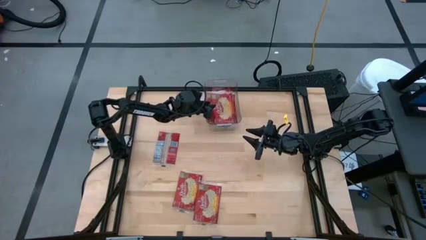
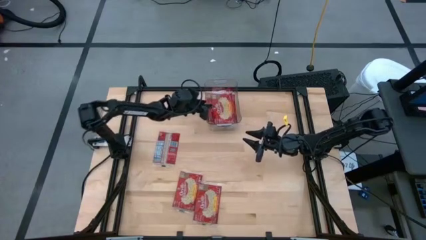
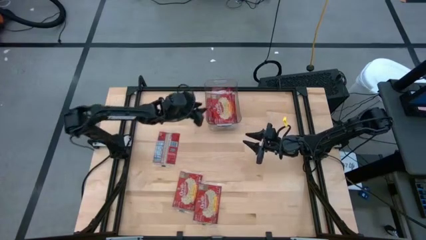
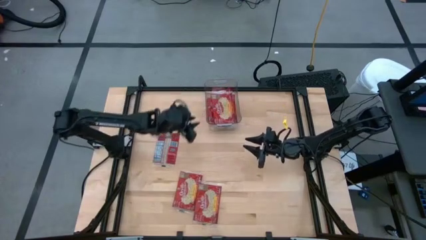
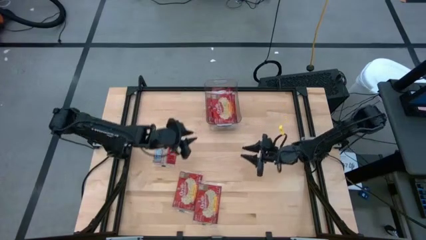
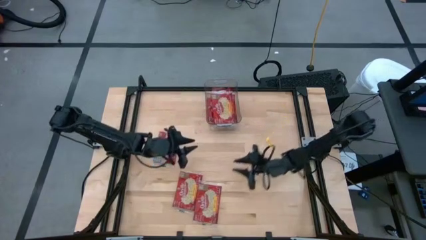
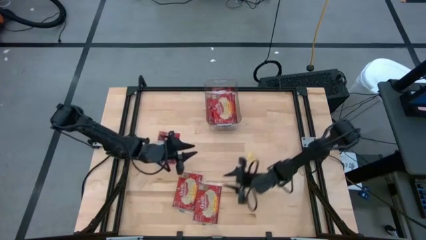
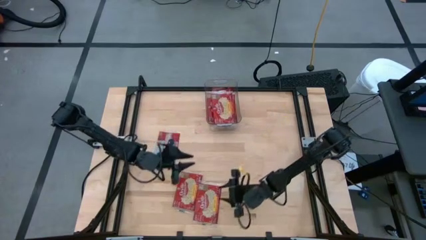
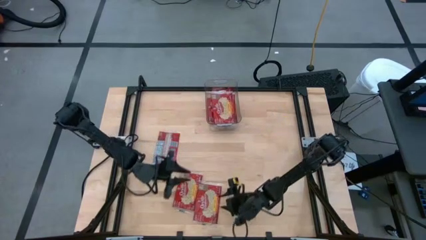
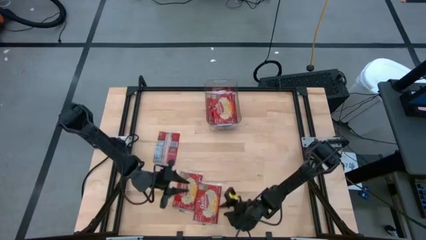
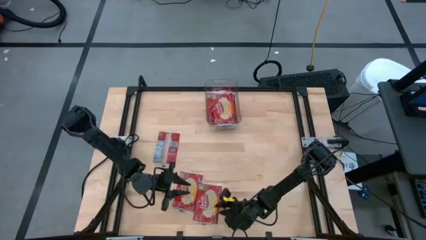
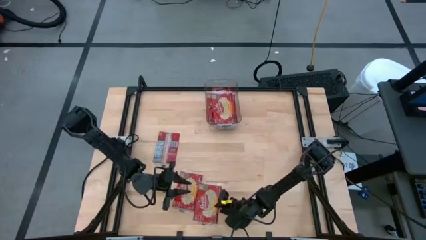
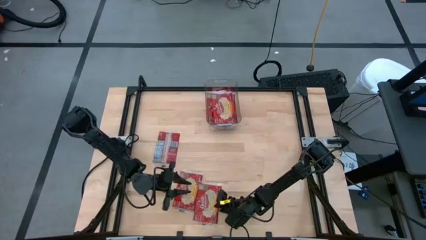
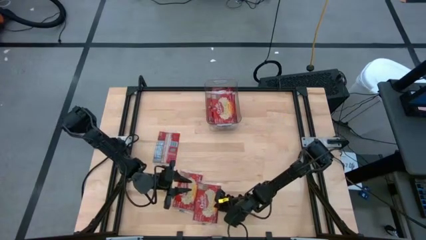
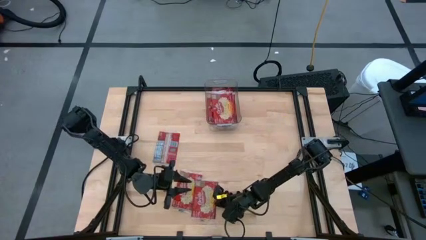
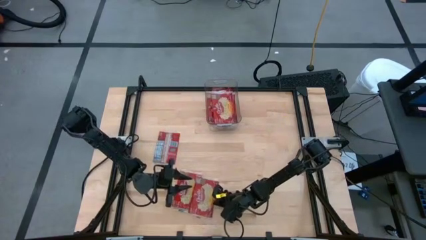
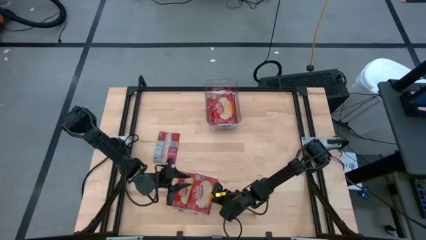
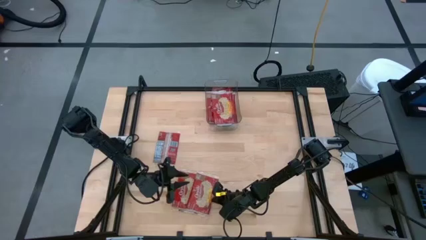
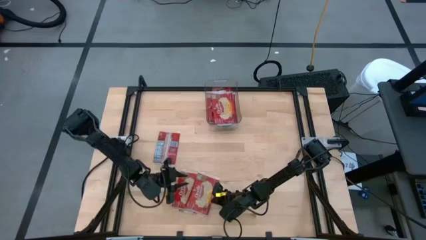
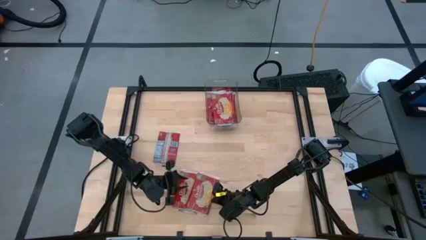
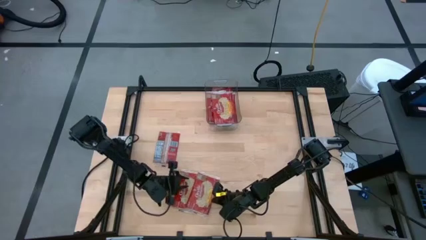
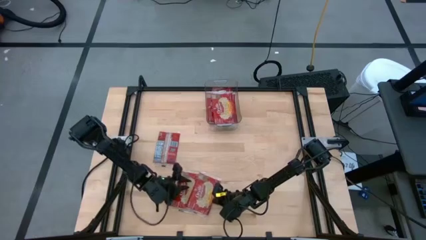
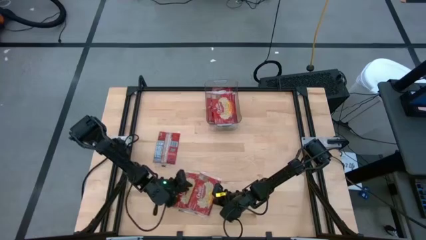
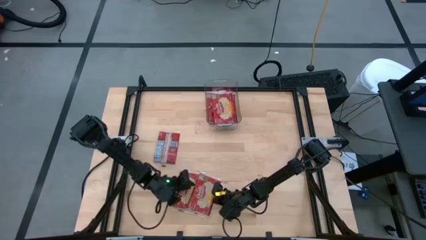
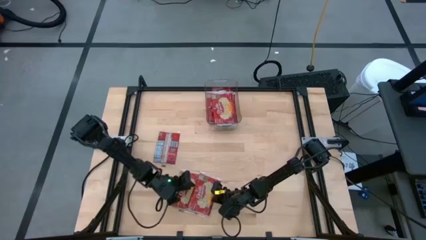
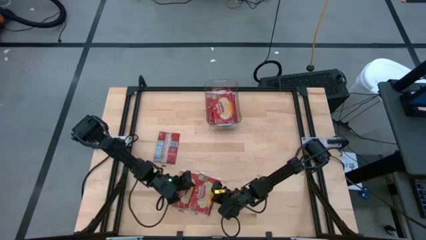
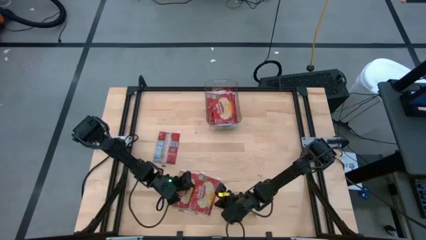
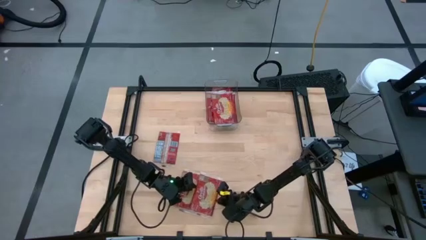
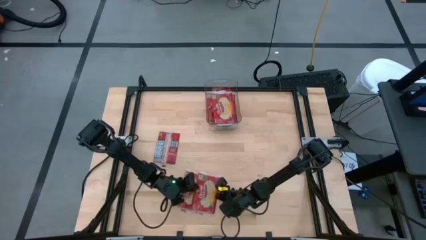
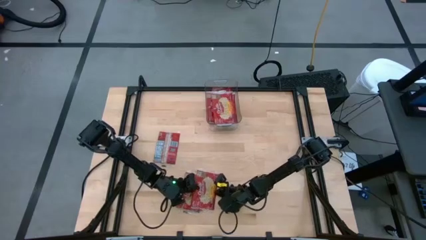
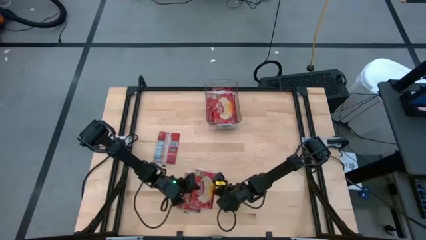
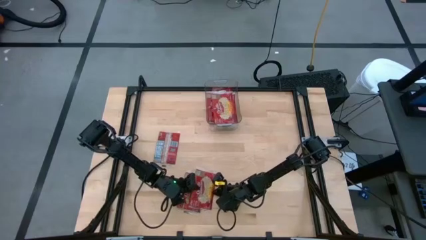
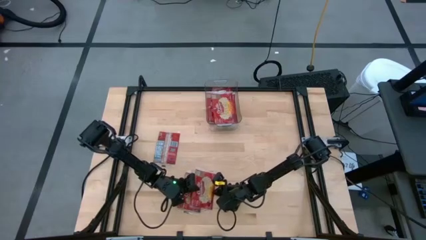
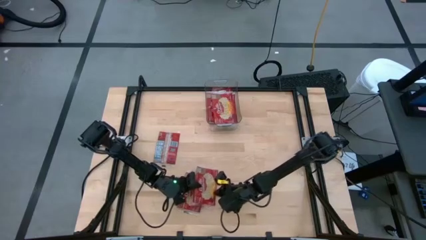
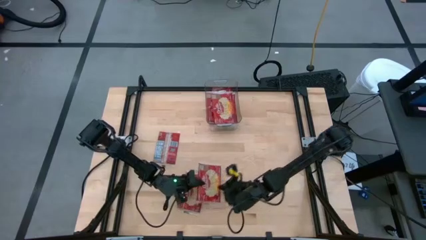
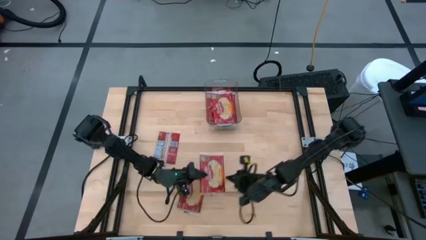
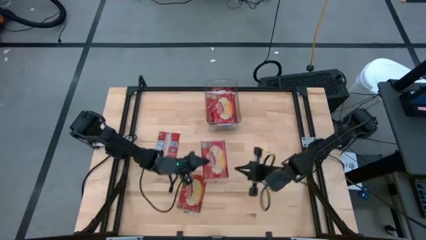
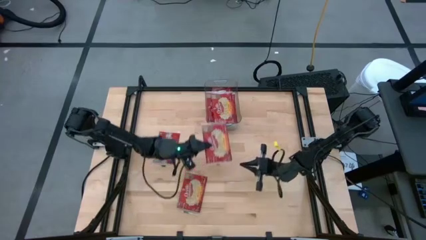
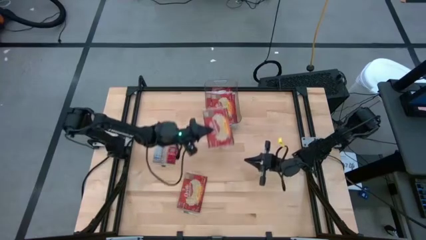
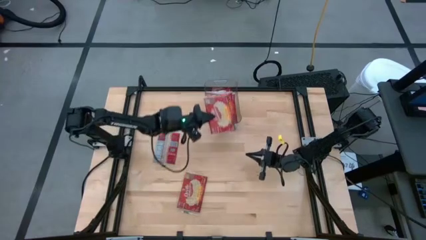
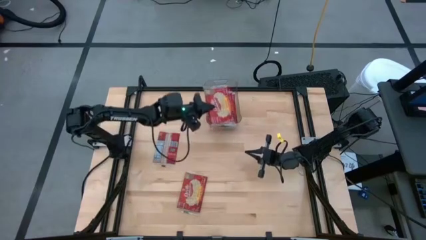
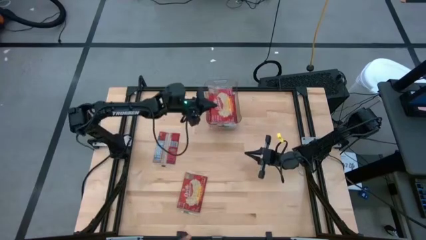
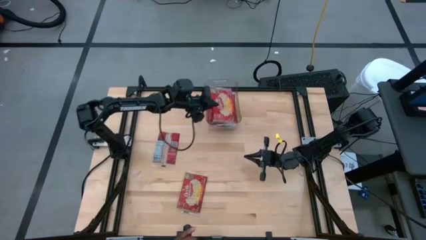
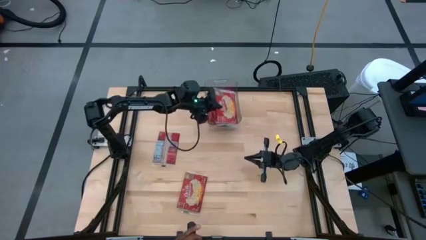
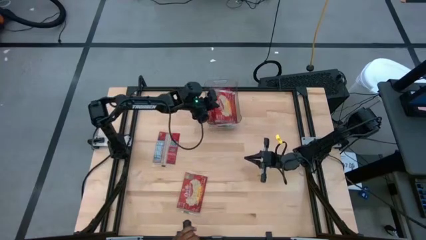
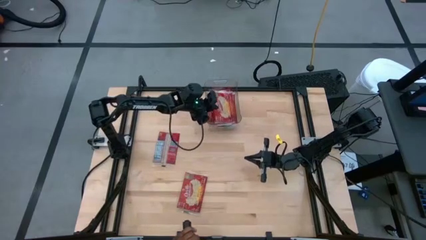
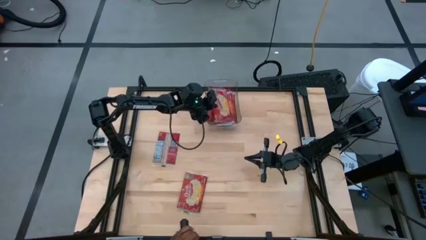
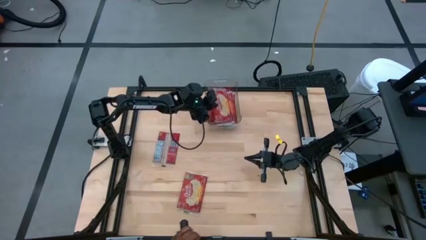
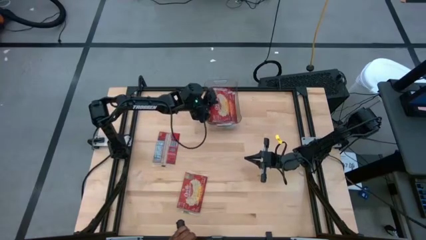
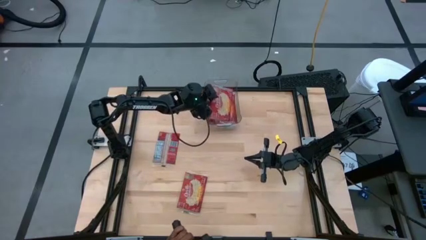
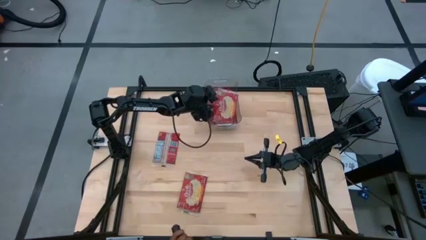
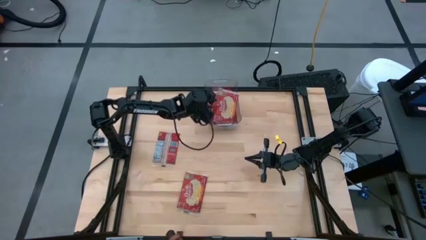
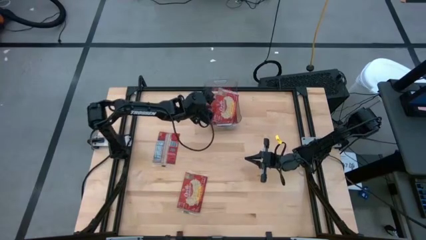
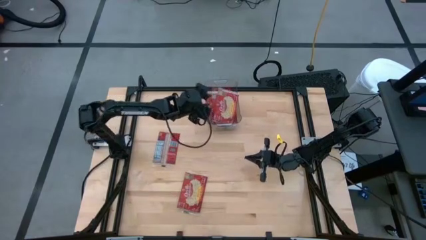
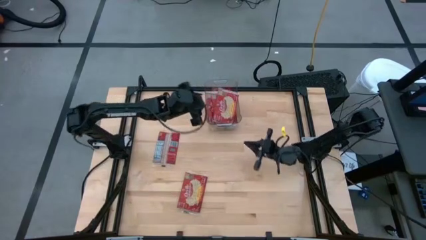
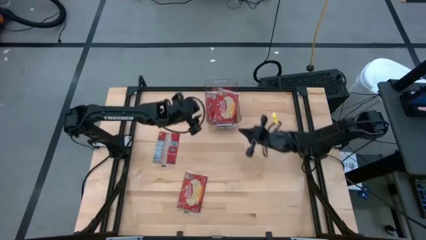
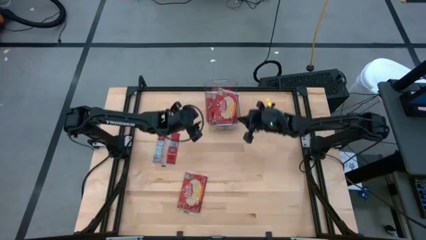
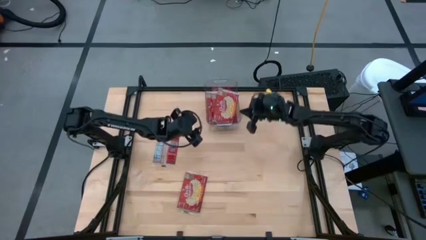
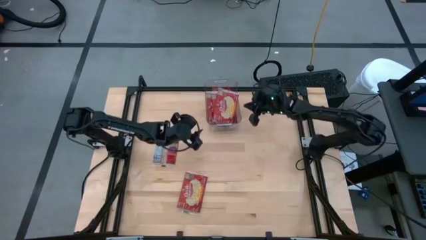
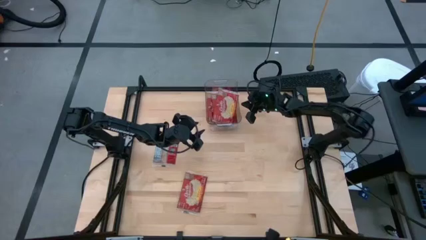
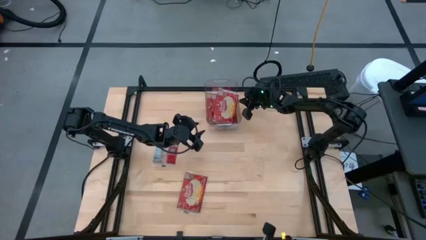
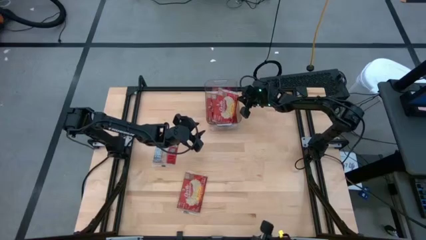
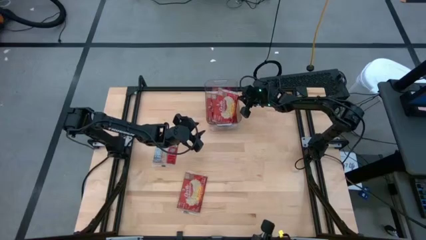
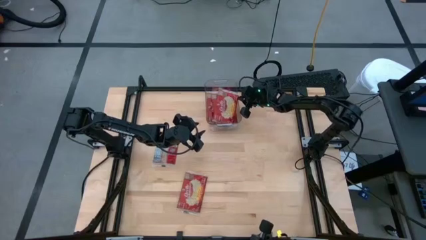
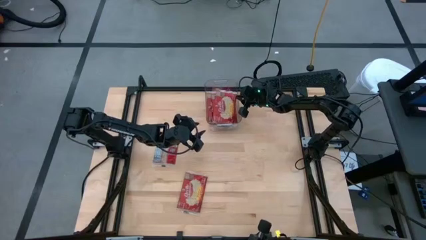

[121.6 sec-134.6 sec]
Task: Sort popcorn bags into baskets
Put the red popcorn pack into the transparent bin

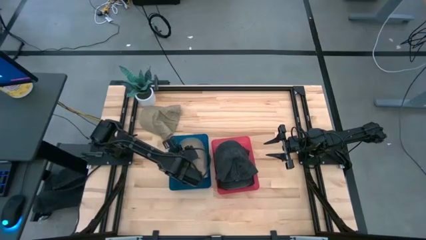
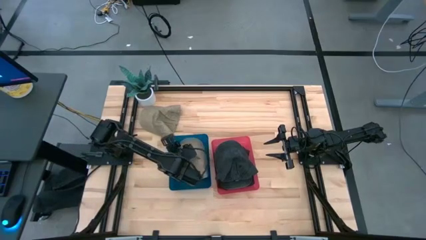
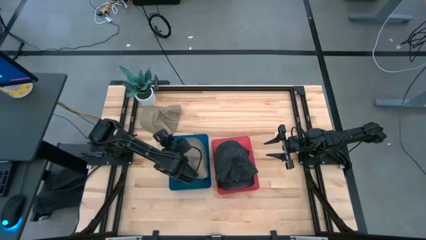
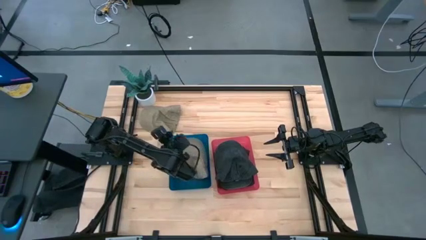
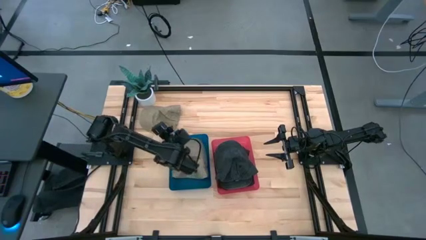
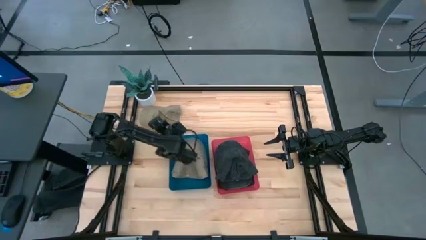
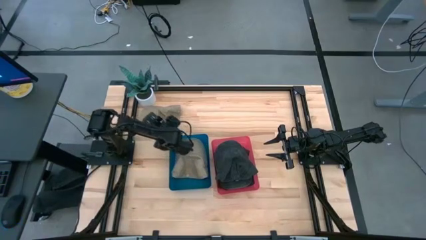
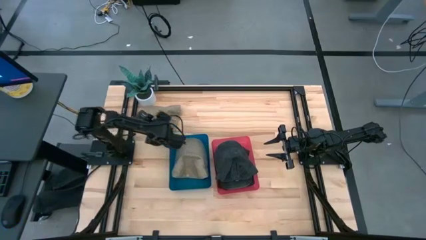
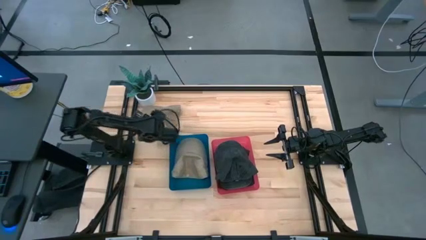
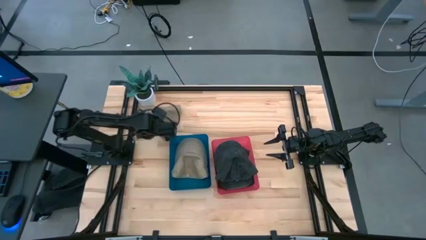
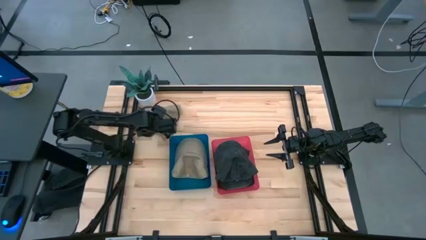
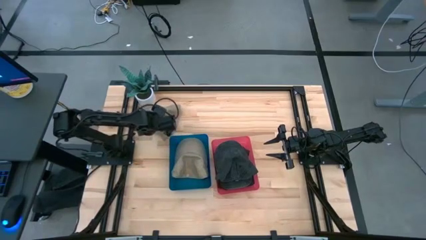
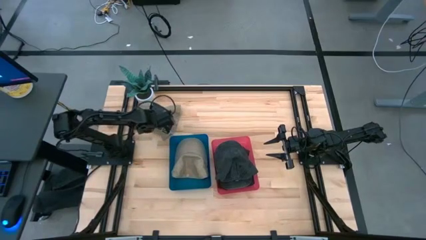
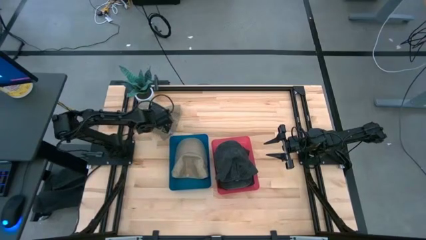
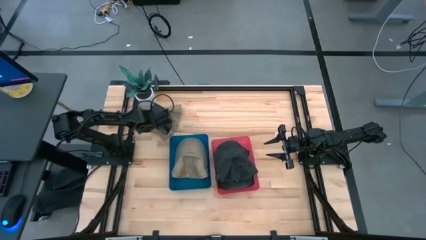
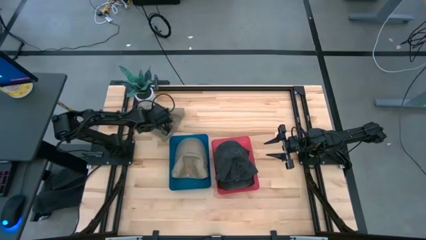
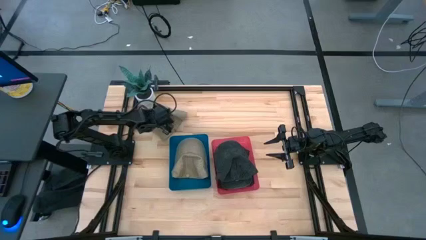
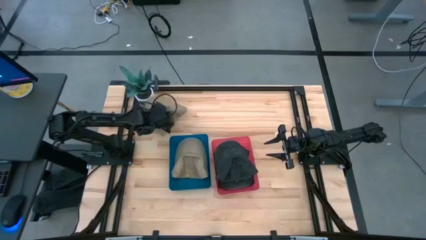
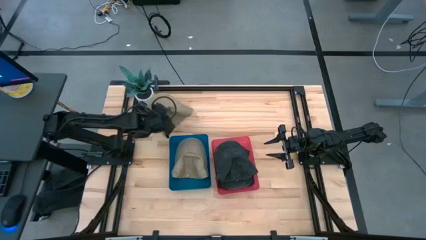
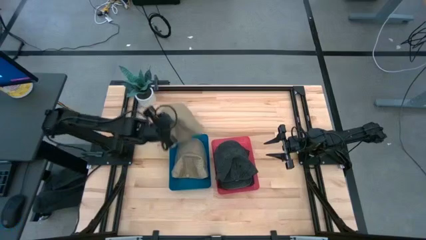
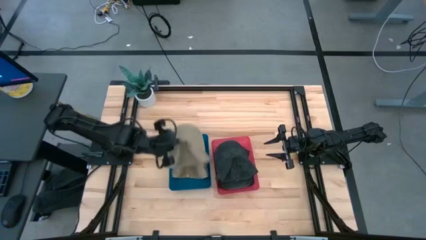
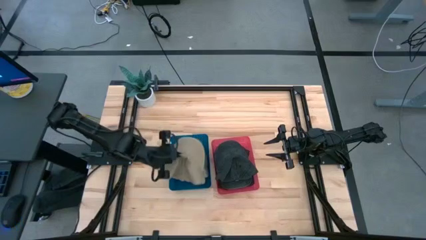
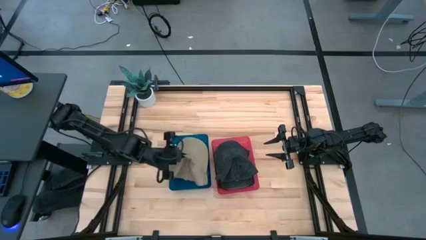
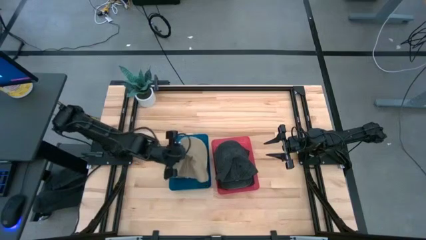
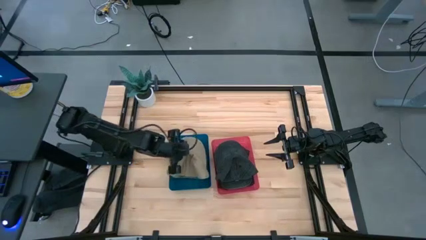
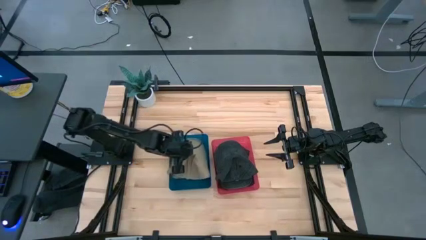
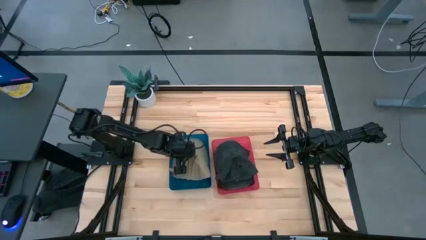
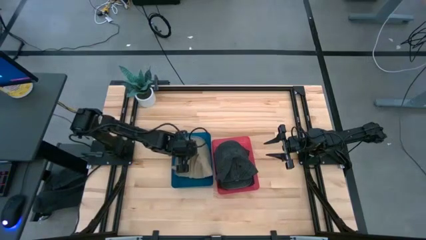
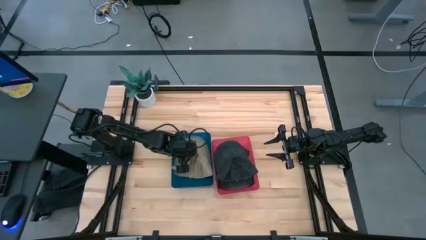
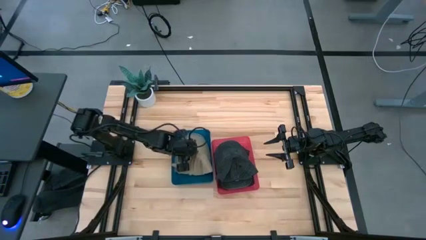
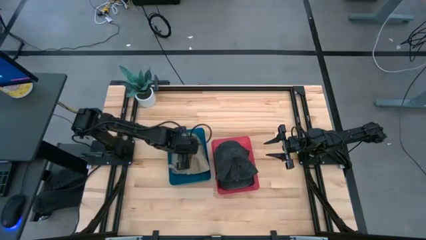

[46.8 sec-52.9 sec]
Task: Pick & Place hat
Put the brown cap into the blue bin
